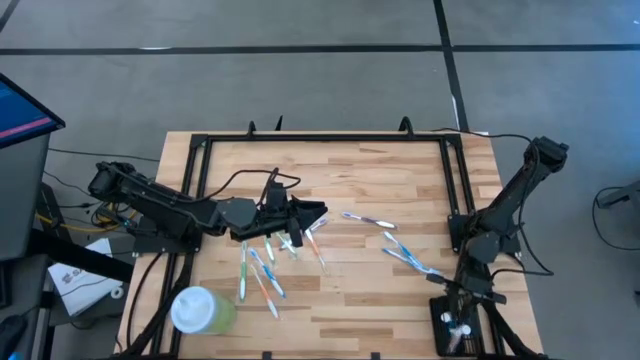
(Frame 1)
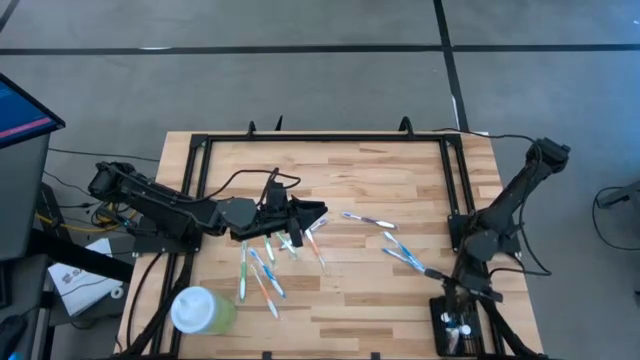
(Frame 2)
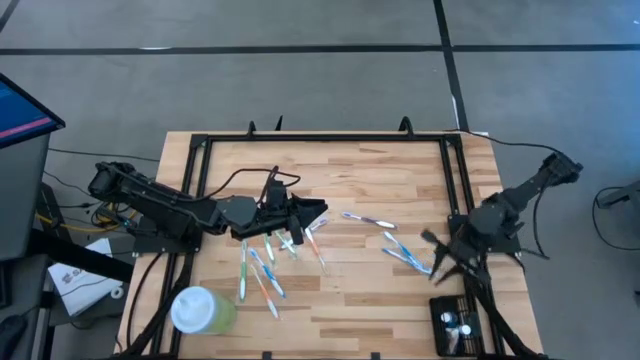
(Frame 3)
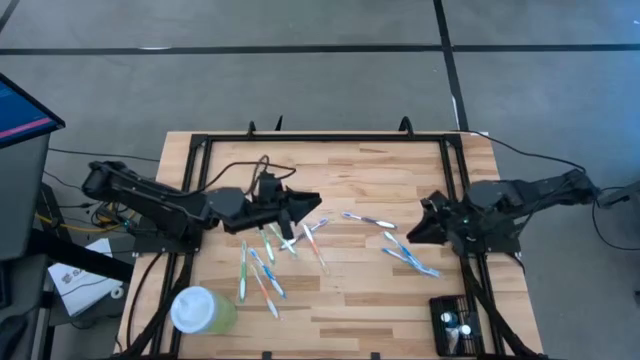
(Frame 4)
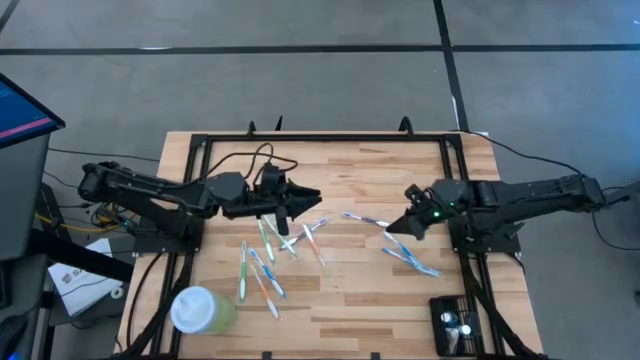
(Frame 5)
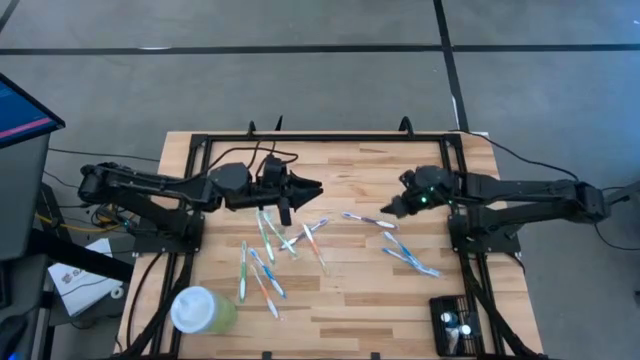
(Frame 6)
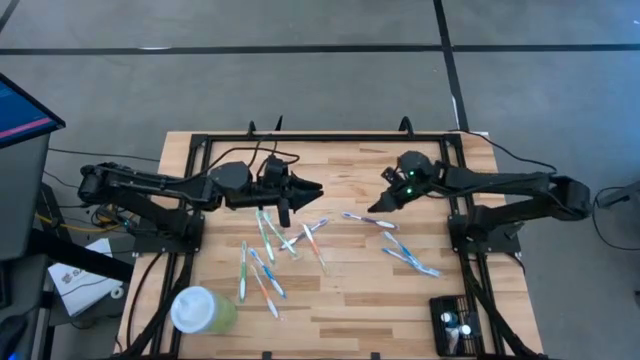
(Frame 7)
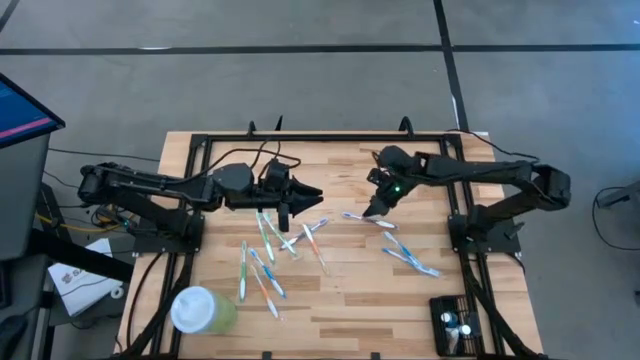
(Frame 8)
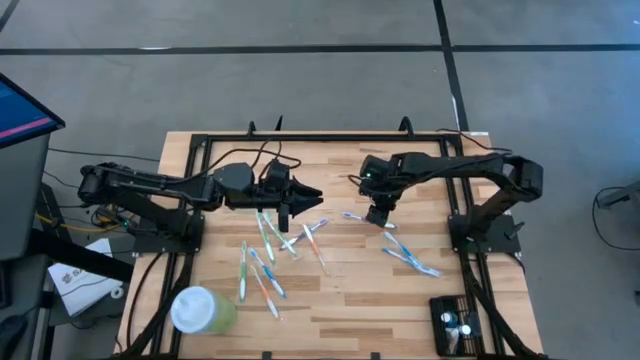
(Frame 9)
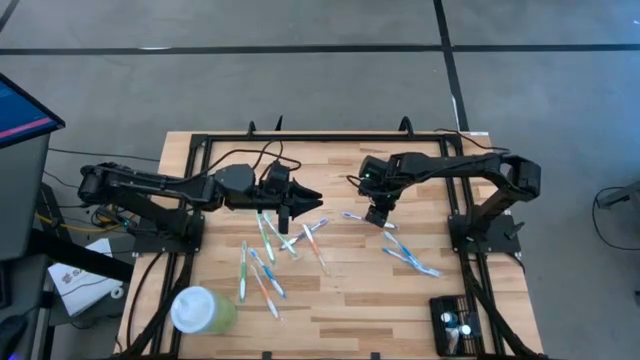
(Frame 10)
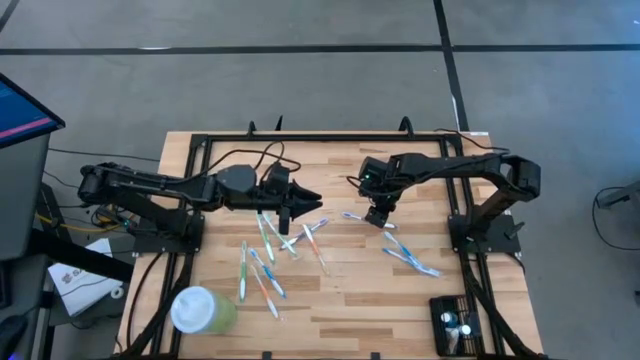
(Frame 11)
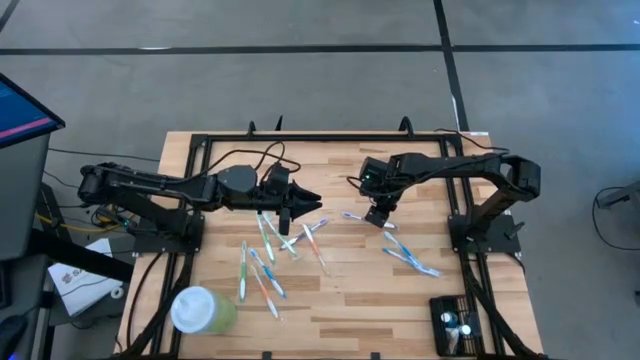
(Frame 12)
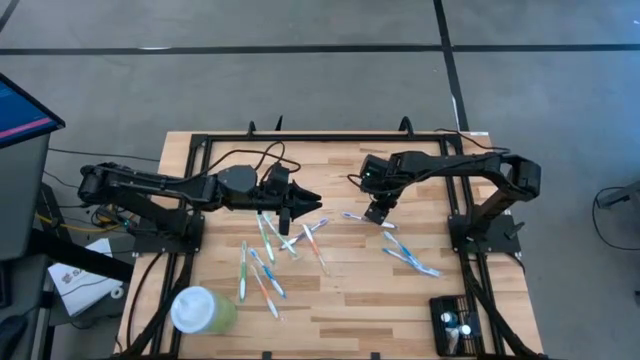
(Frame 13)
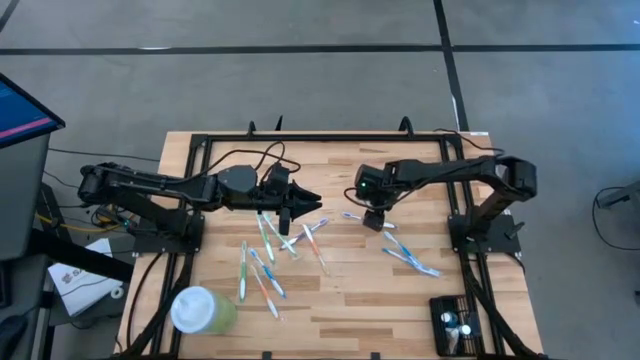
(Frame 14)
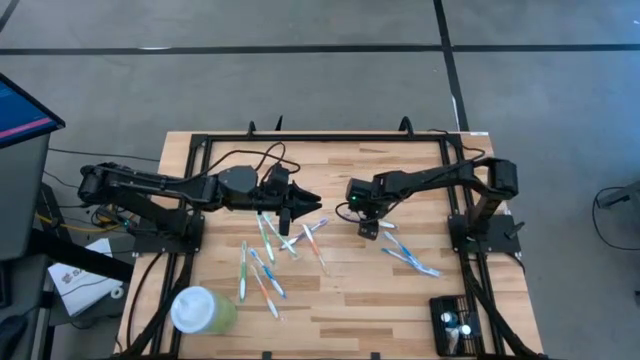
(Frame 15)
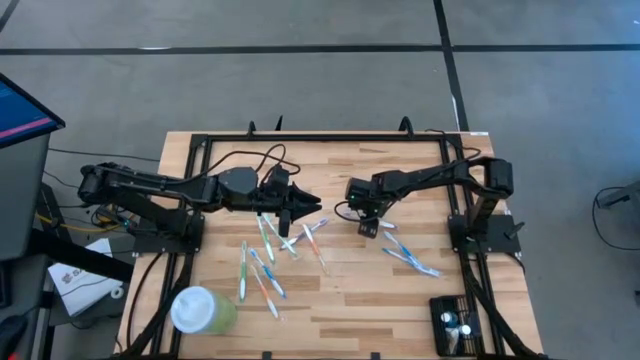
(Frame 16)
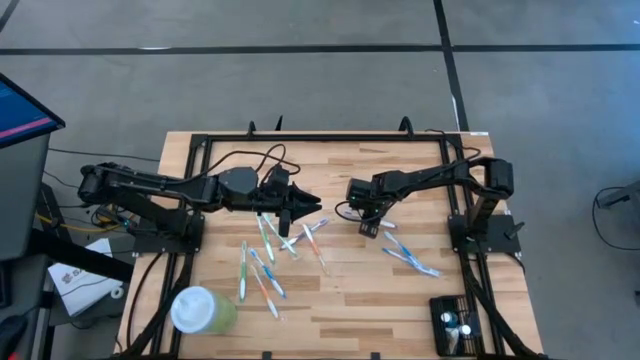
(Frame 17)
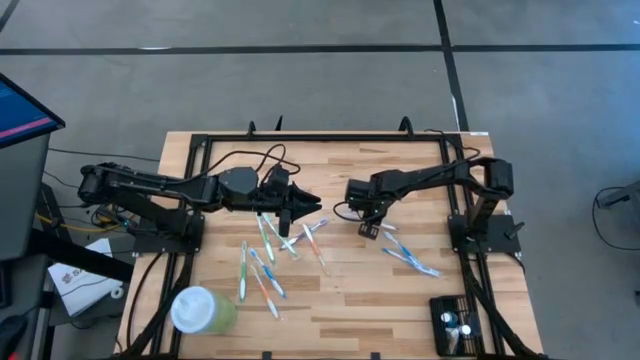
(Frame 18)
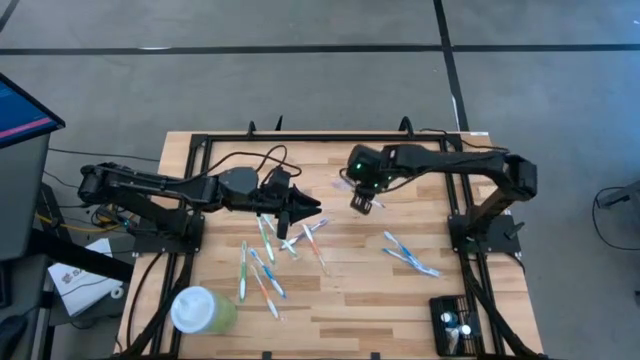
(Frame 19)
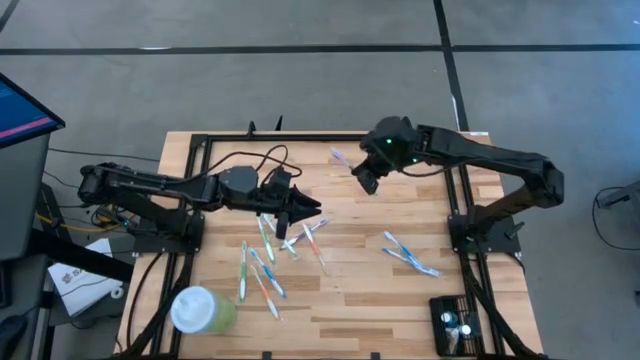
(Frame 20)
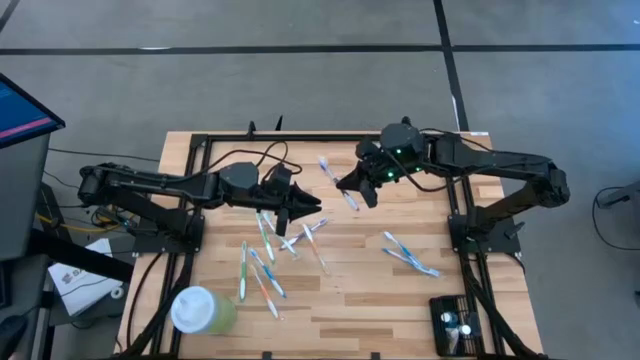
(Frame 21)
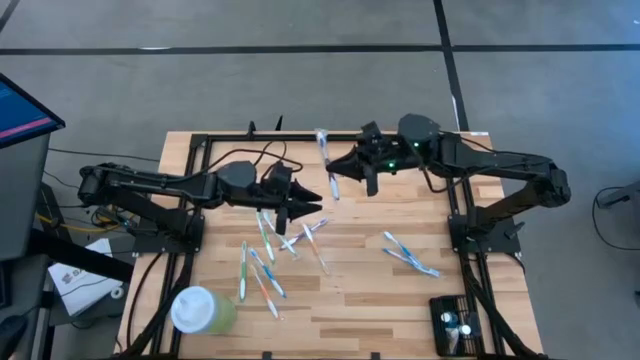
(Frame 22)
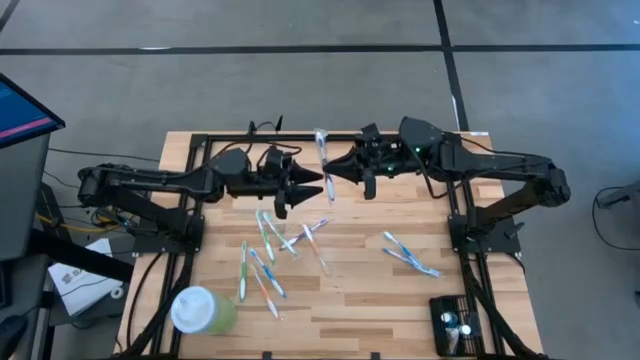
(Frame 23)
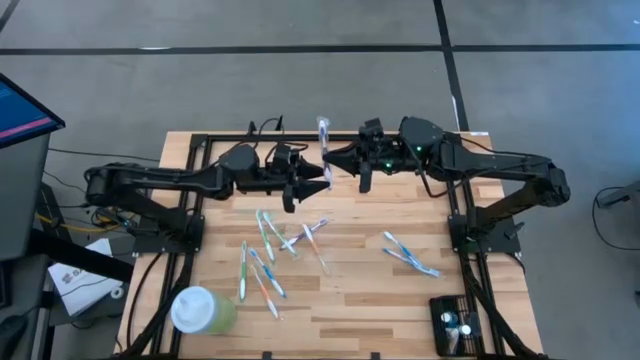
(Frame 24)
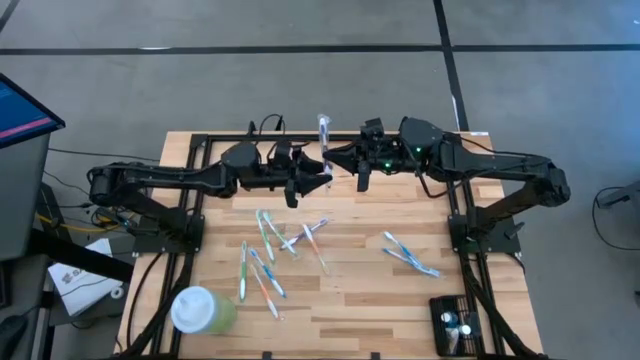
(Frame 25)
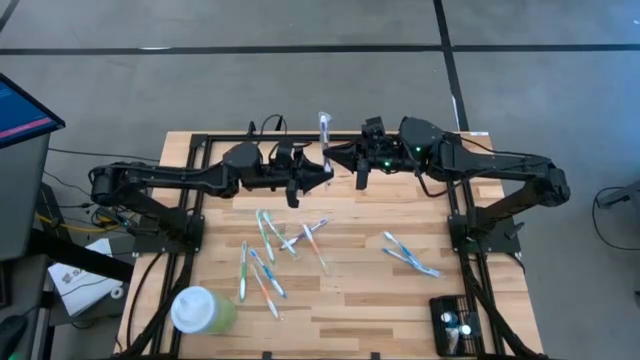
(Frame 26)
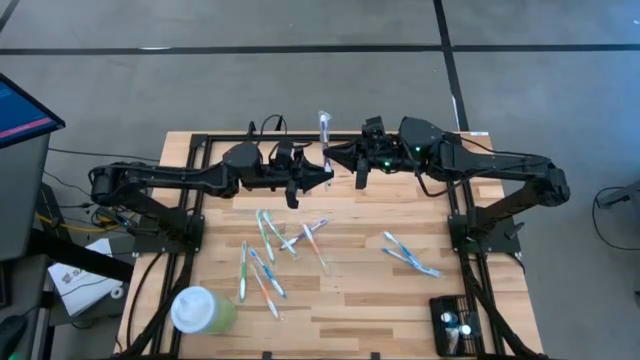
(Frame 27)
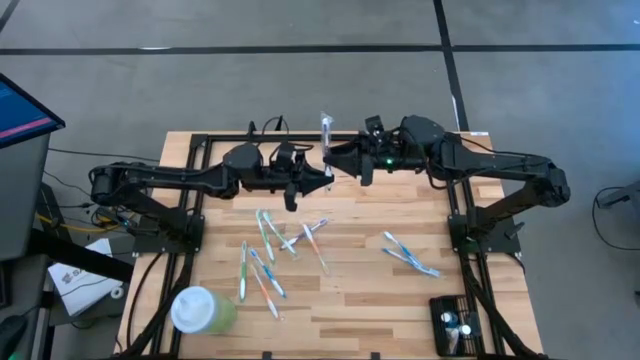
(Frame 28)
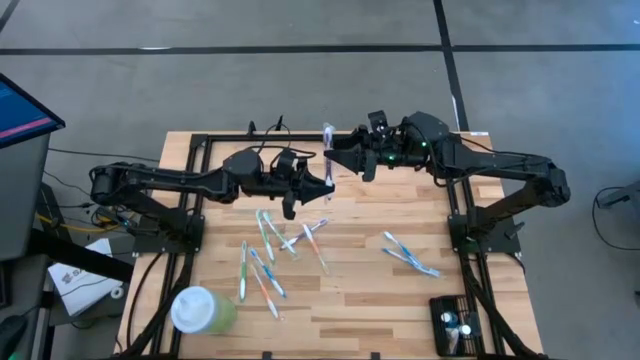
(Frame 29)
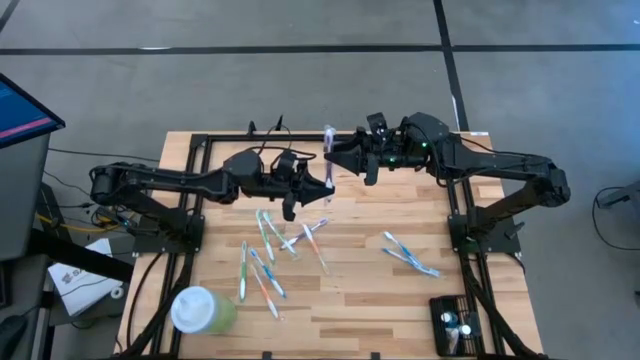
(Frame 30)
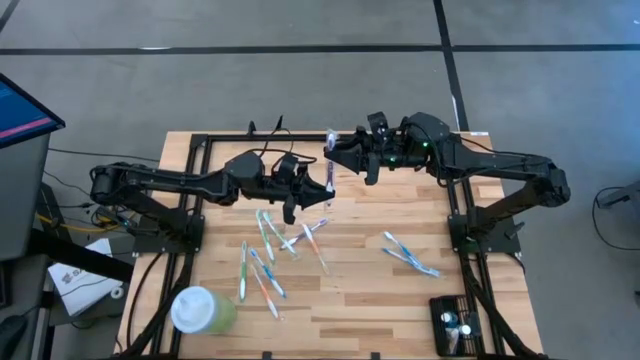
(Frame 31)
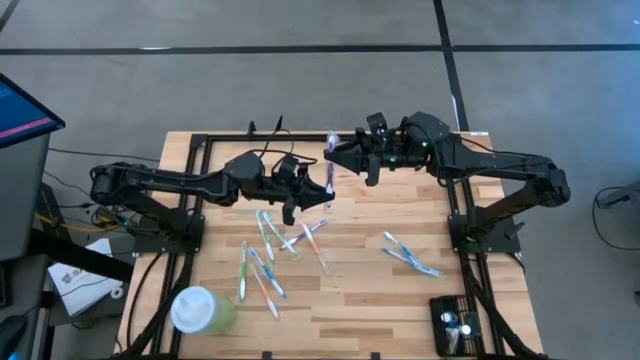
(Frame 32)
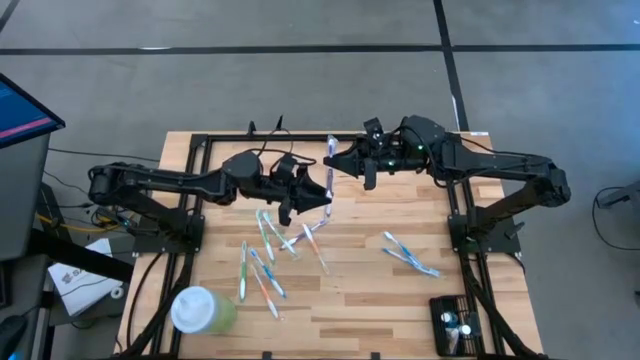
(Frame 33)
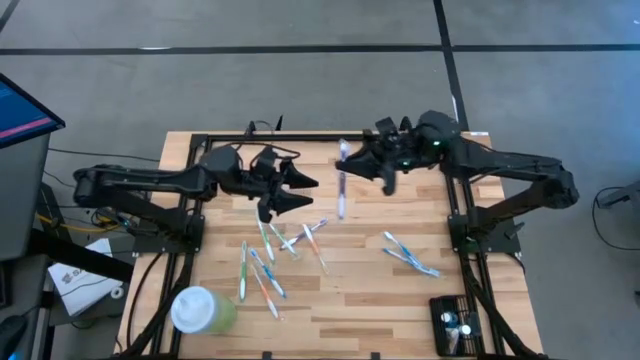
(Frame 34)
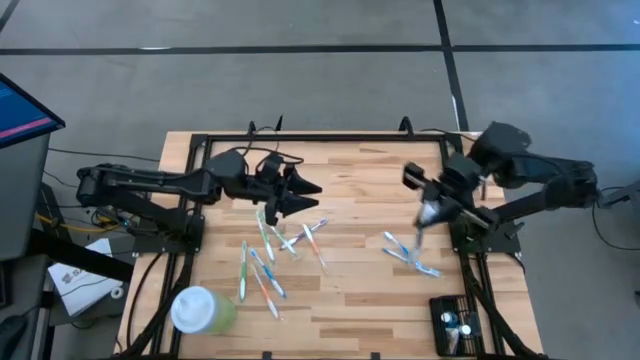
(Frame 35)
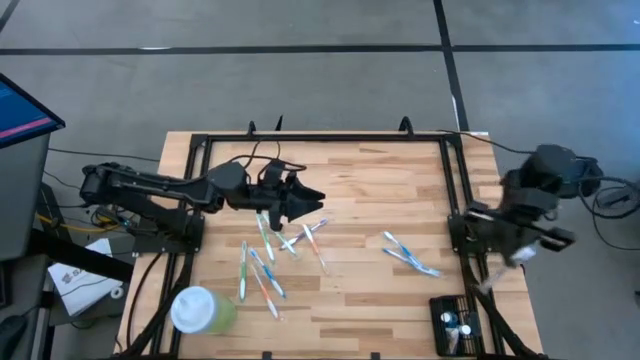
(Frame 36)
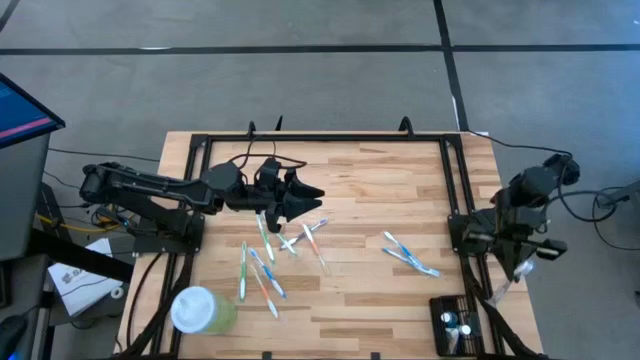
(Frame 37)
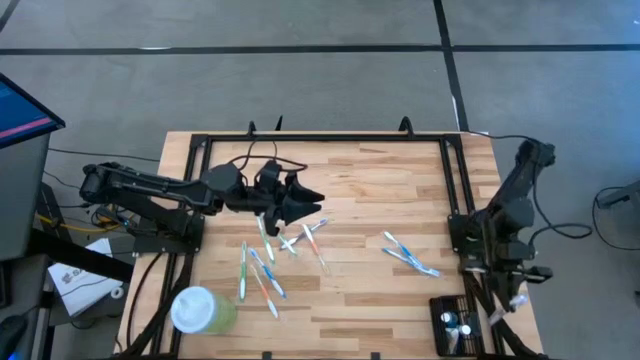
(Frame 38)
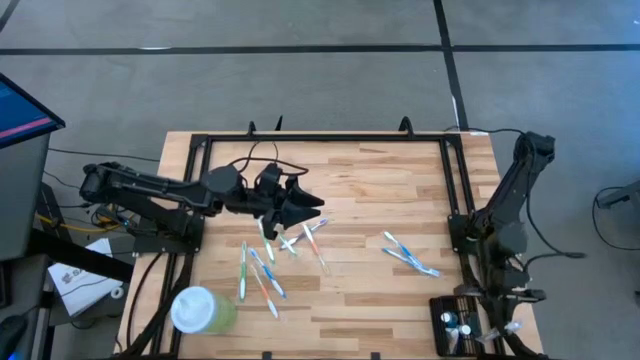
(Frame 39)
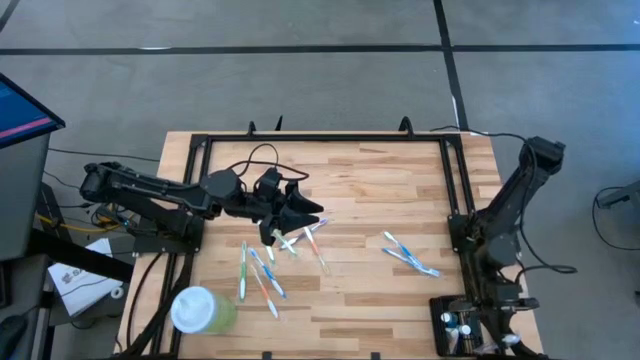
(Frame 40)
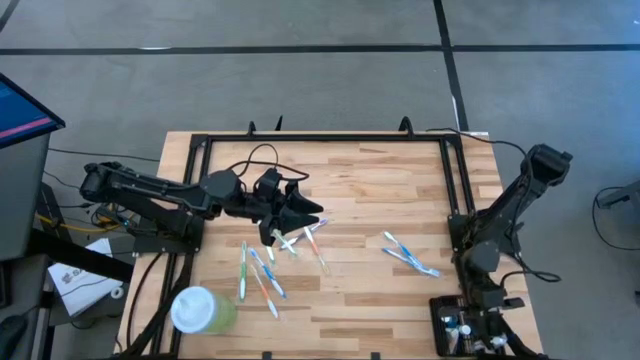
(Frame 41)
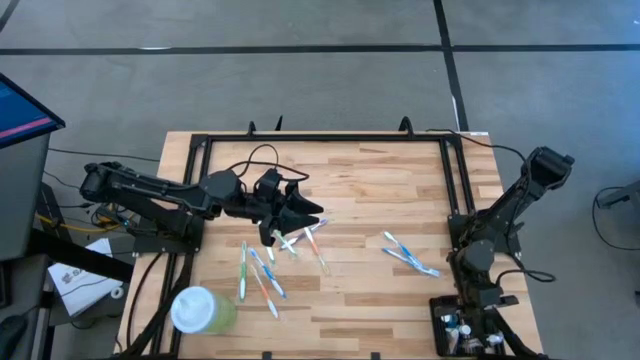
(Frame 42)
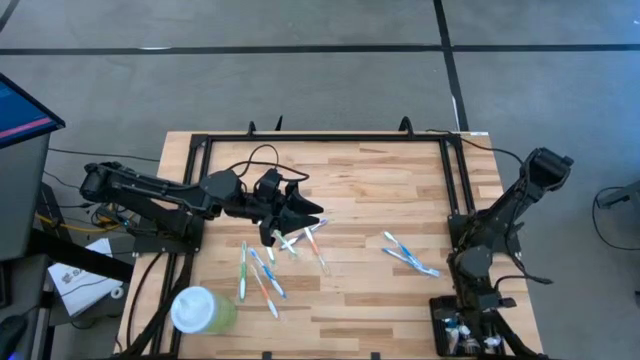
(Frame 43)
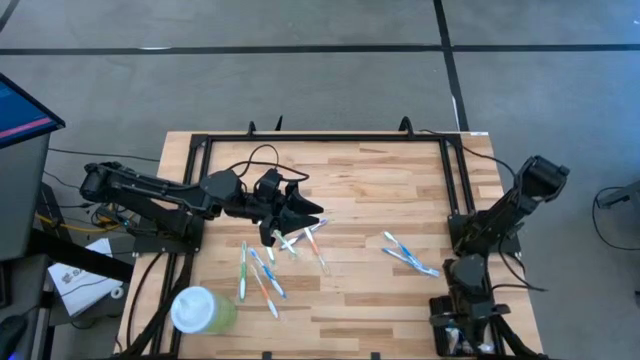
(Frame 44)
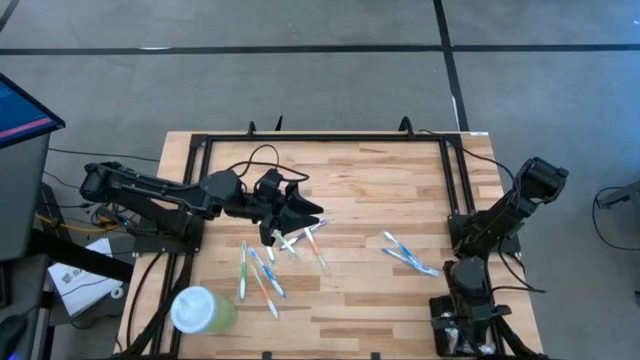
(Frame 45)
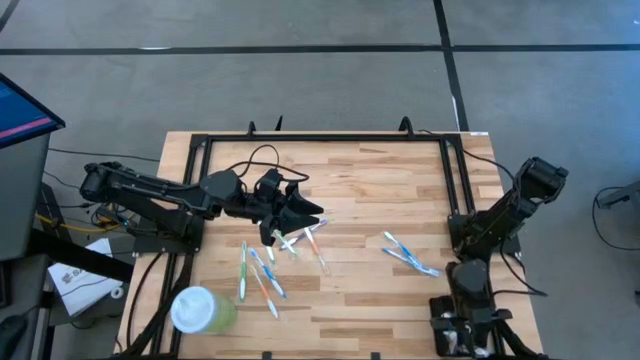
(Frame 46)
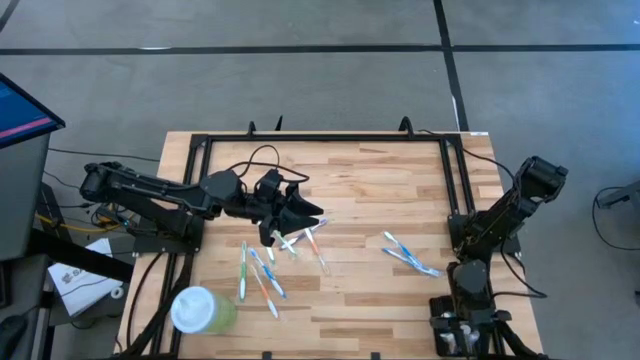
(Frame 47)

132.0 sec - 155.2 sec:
Task: Pick & Place toothbrushing station
Put the right purple toothbrush into the black organizer
